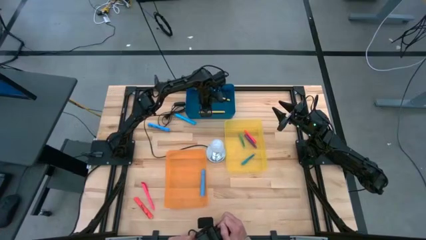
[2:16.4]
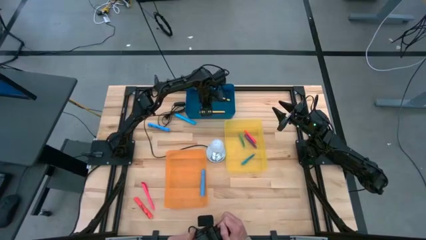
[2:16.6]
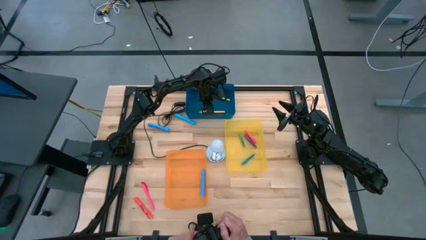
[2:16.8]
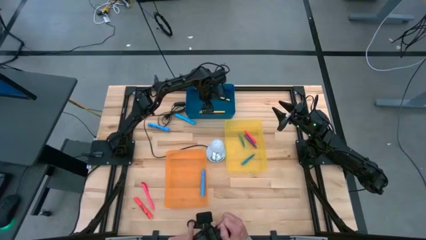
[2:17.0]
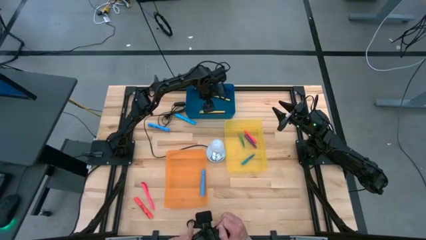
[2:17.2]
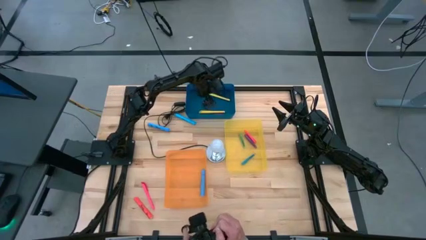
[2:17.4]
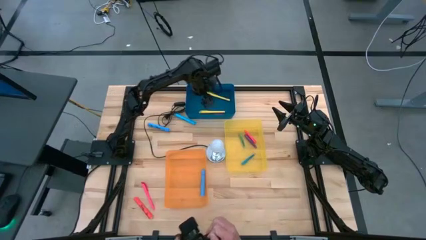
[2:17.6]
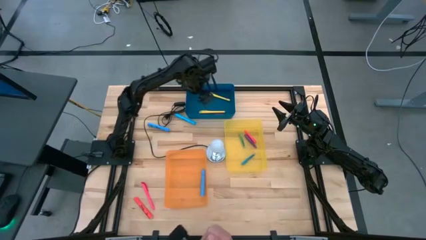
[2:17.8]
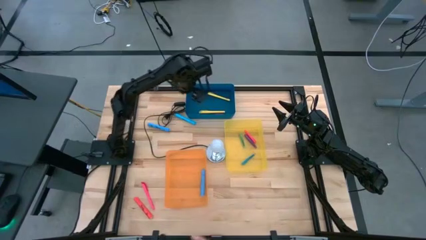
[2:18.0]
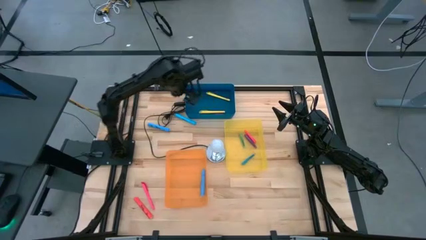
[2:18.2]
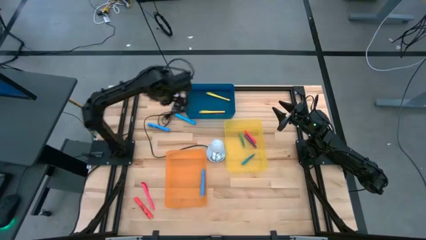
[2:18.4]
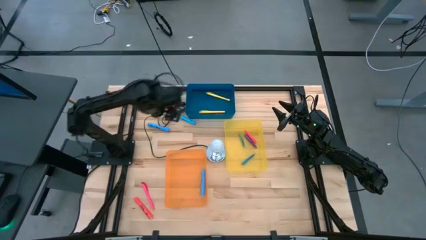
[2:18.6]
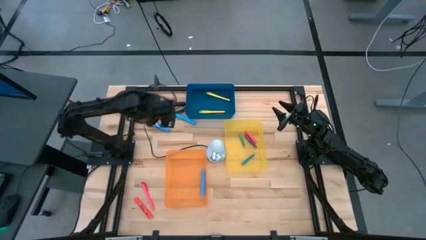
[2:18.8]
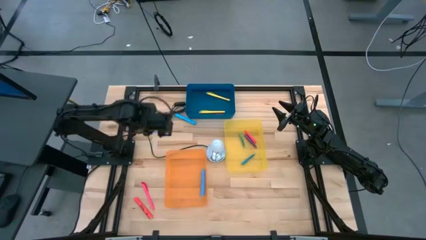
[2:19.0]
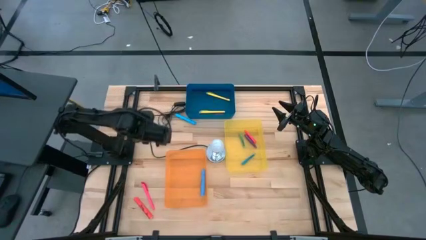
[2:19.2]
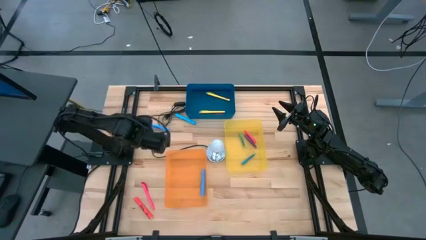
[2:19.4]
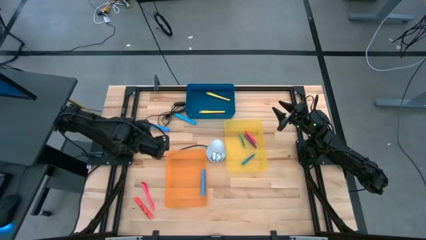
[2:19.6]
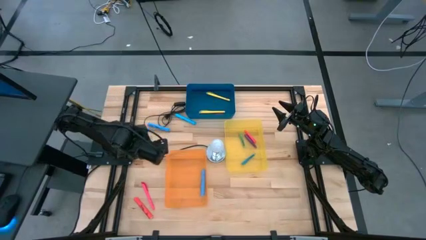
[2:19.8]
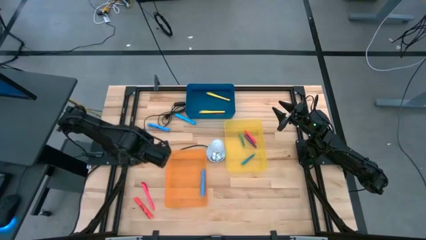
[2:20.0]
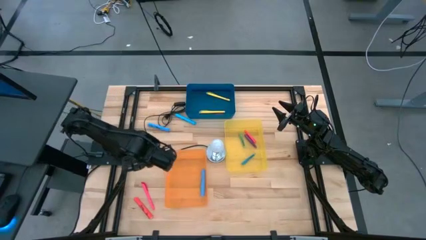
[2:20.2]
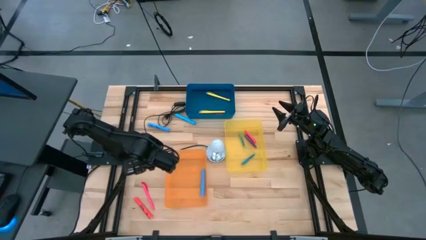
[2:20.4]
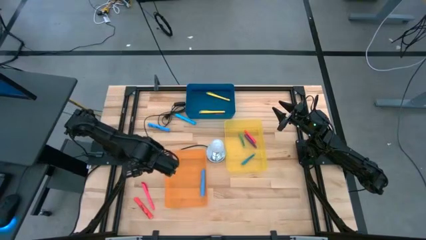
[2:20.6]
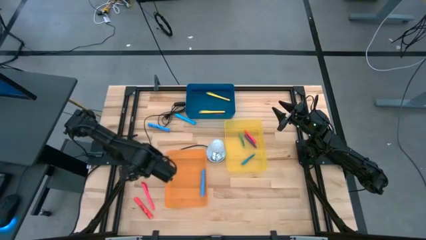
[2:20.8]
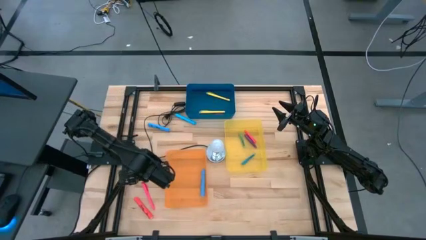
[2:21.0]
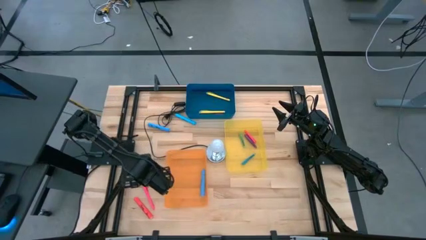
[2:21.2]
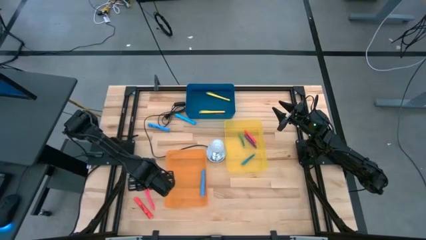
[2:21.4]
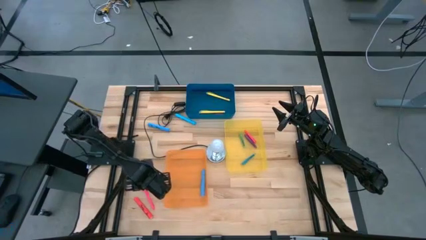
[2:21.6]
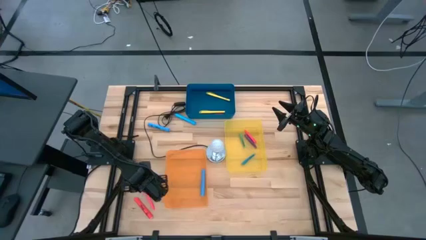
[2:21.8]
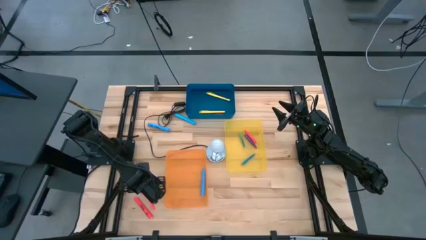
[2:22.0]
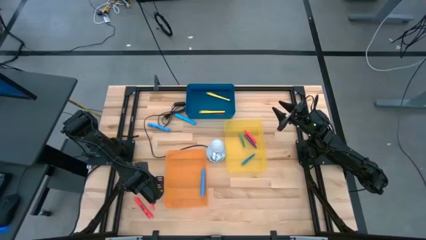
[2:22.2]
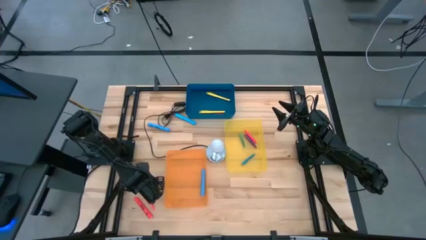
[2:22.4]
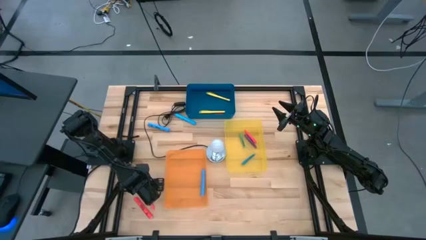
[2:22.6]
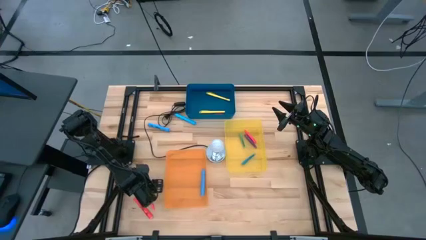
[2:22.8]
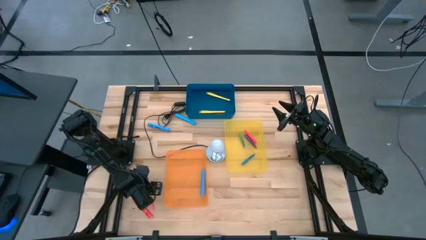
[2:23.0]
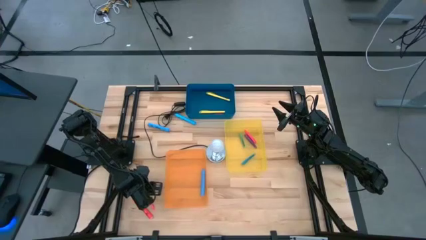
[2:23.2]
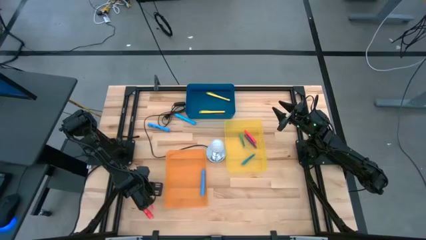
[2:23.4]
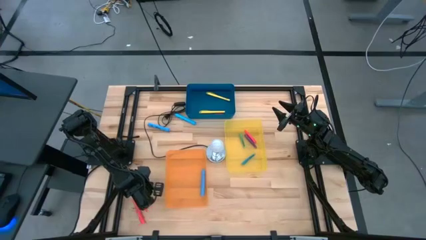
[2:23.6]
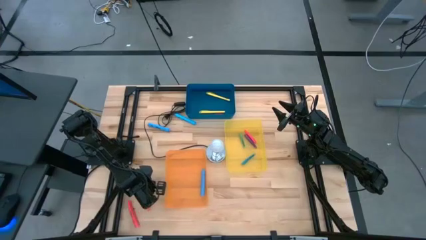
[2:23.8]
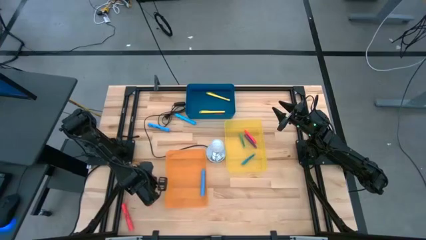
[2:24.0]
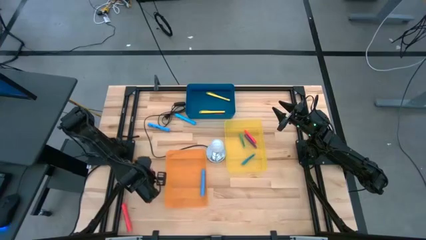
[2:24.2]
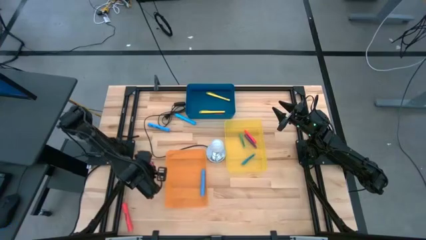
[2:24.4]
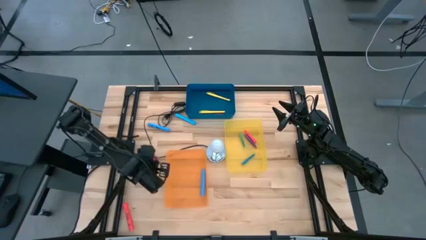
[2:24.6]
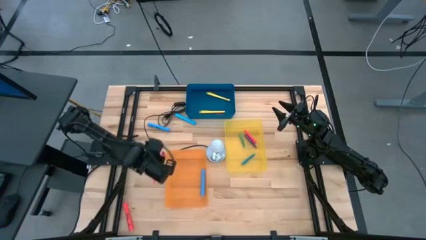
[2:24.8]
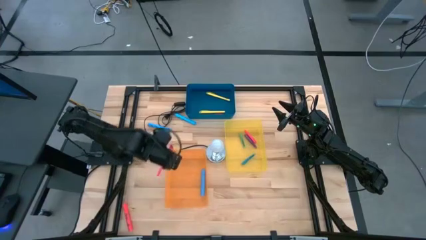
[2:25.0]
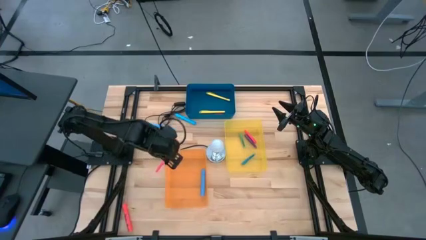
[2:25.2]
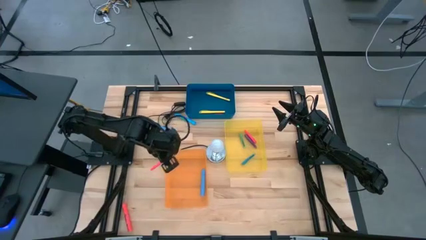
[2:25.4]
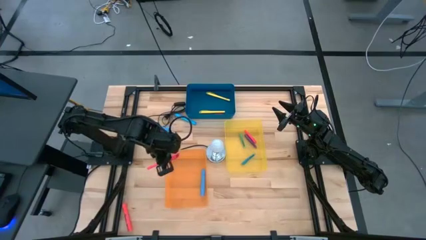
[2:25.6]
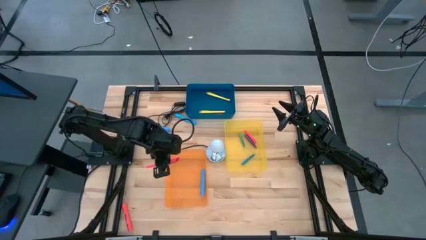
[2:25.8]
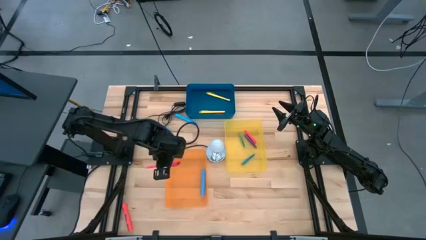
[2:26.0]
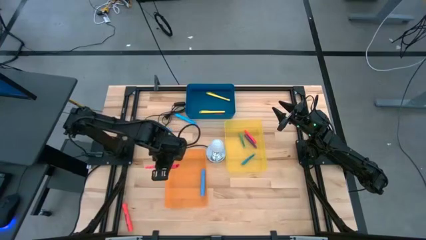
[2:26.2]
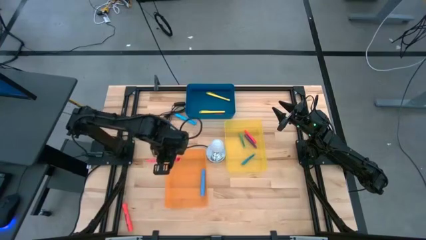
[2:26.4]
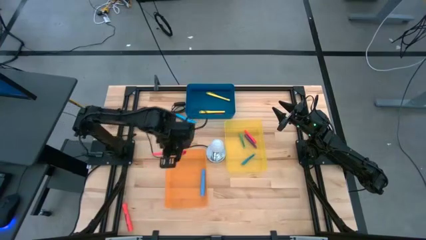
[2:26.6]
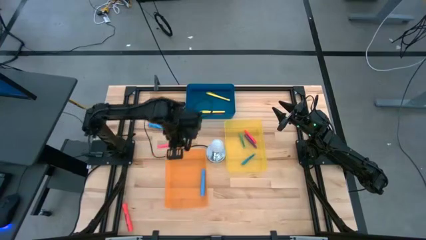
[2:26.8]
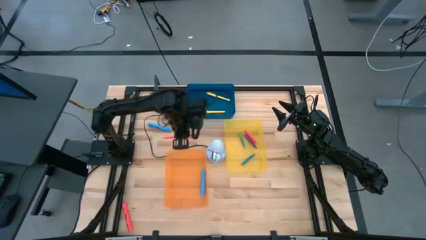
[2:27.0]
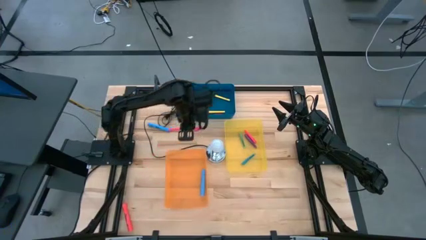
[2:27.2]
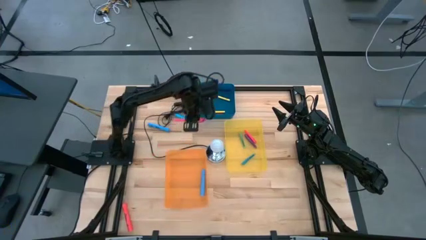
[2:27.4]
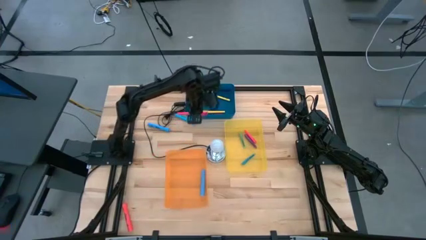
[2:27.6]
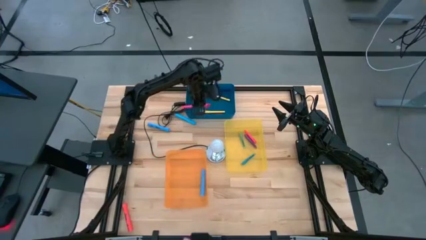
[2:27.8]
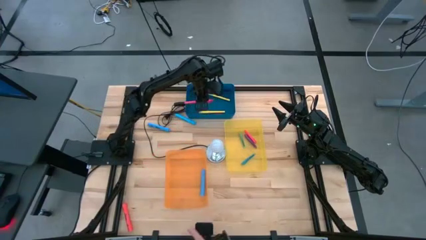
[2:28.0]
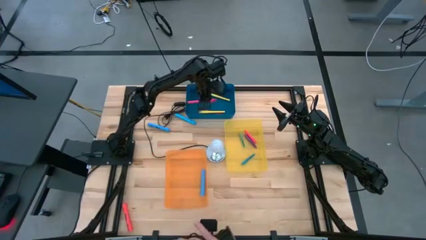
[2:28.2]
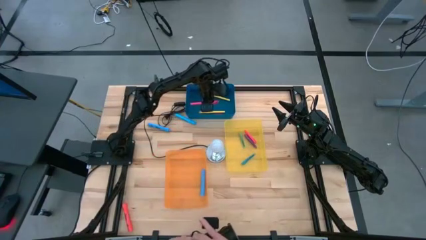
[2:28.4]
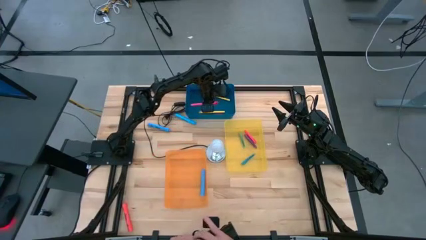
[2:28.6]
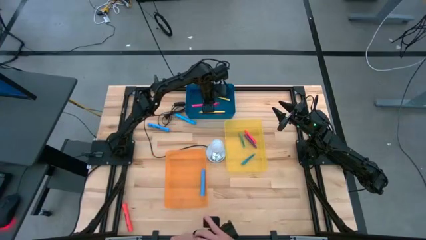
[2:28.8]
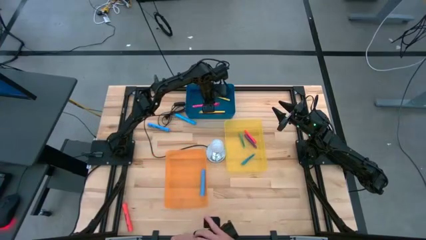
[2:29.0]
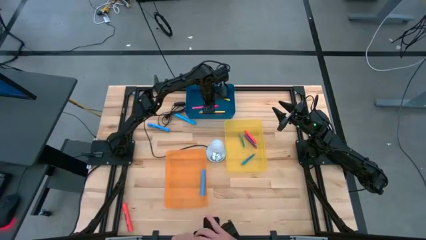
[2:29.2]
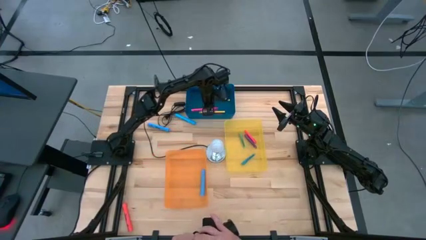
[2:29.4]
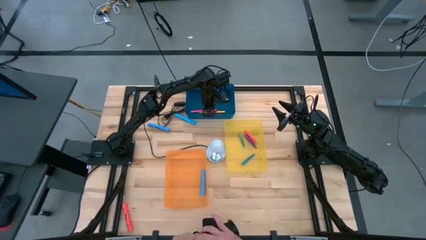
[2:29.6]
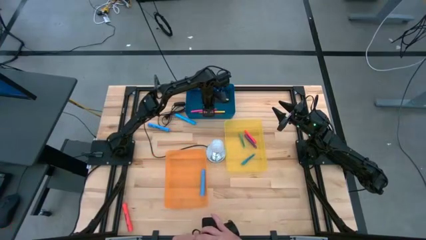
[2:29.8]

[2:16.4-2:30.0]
Task: Pick & Place Markers
Put the pink pen into the blue bin
